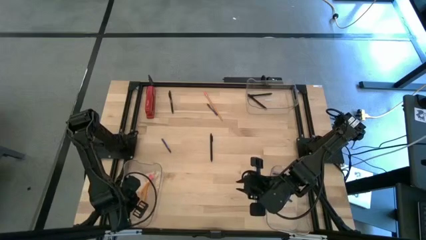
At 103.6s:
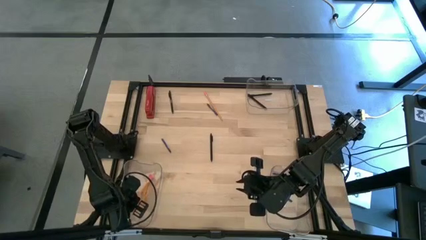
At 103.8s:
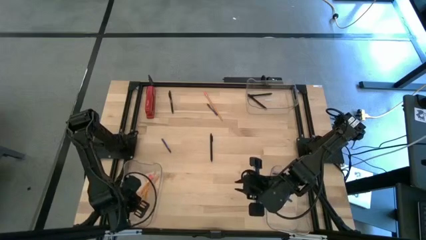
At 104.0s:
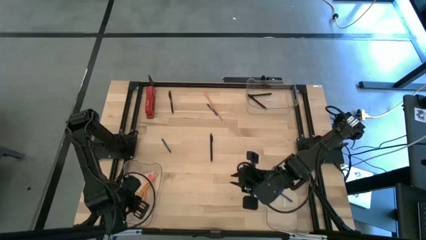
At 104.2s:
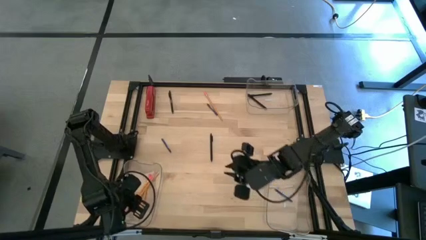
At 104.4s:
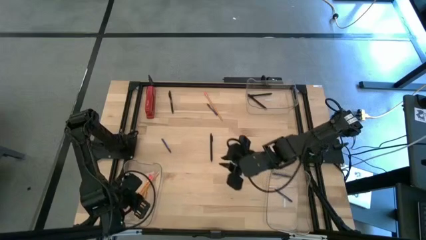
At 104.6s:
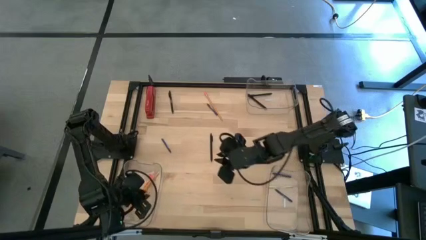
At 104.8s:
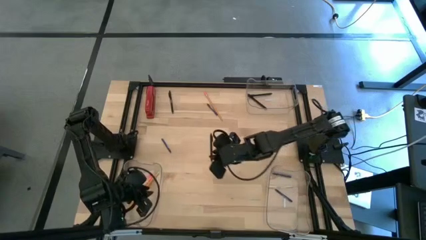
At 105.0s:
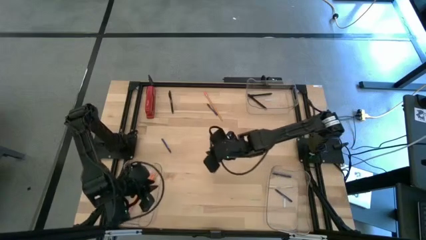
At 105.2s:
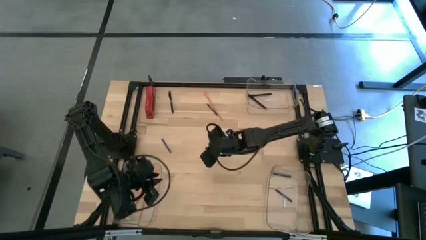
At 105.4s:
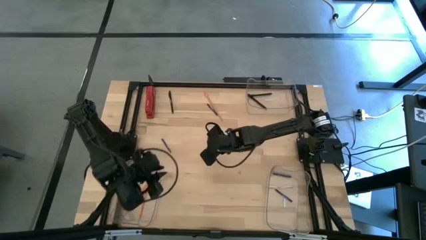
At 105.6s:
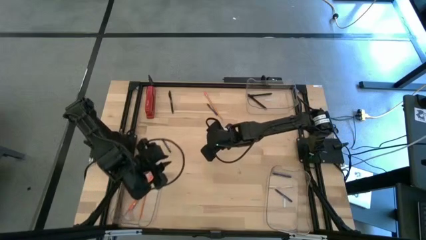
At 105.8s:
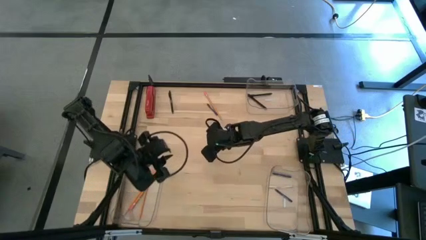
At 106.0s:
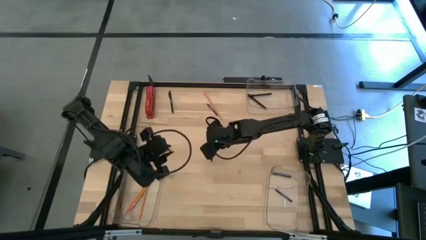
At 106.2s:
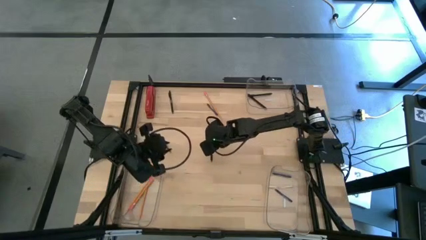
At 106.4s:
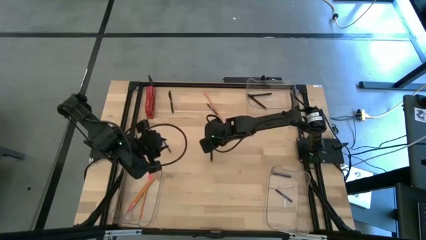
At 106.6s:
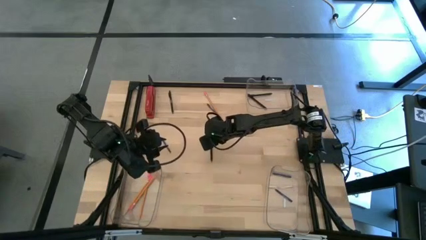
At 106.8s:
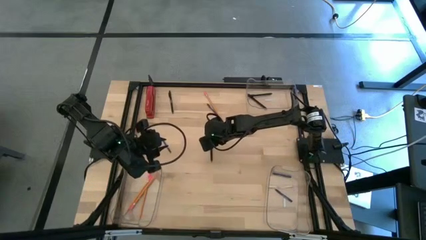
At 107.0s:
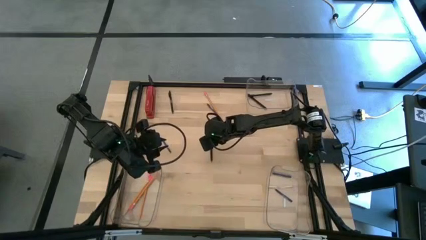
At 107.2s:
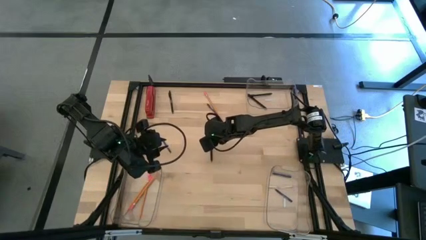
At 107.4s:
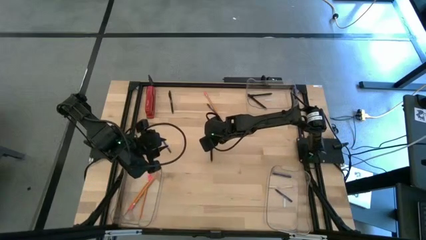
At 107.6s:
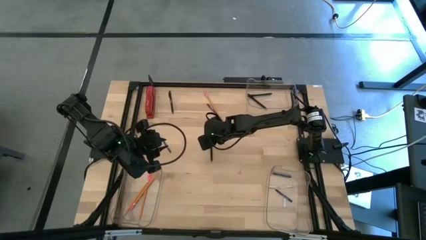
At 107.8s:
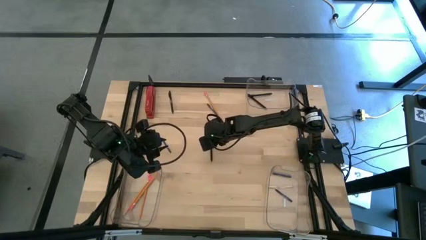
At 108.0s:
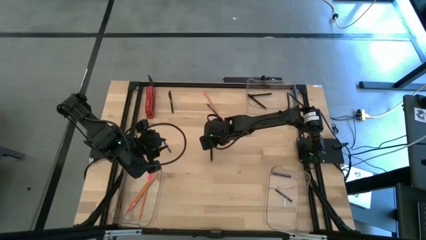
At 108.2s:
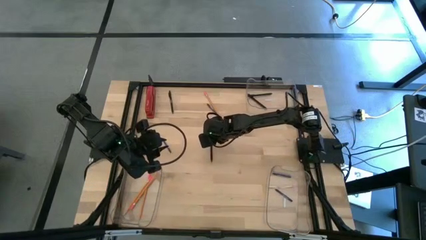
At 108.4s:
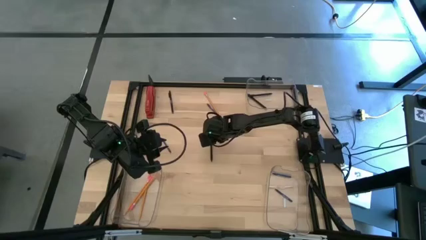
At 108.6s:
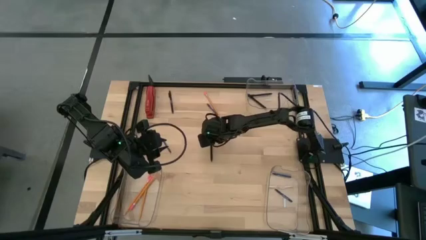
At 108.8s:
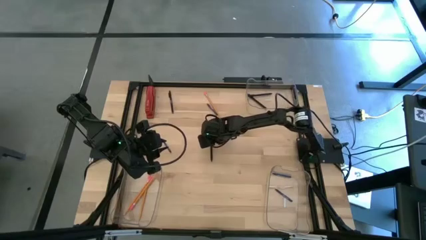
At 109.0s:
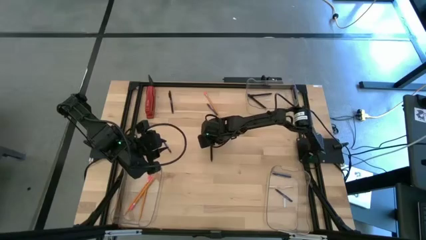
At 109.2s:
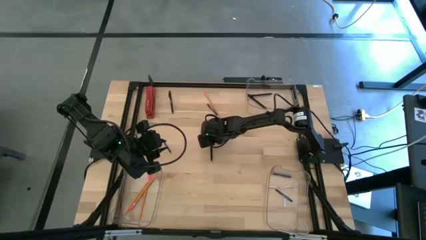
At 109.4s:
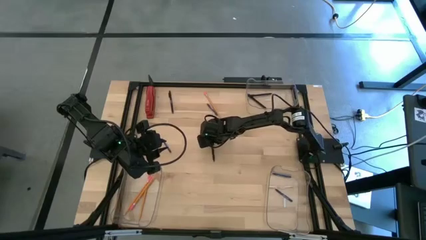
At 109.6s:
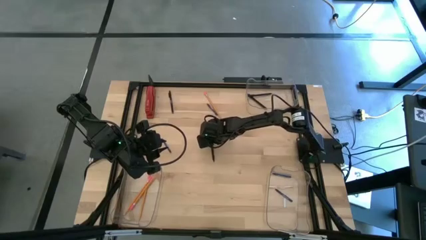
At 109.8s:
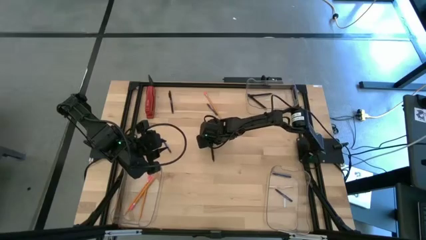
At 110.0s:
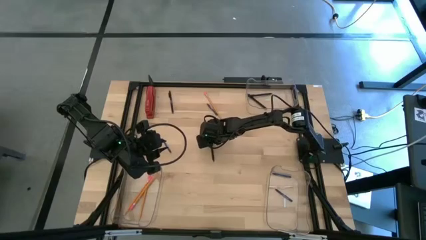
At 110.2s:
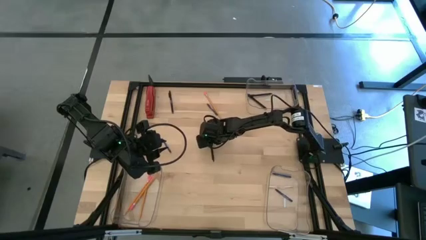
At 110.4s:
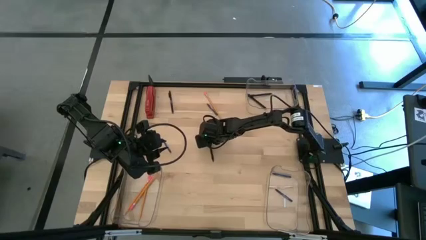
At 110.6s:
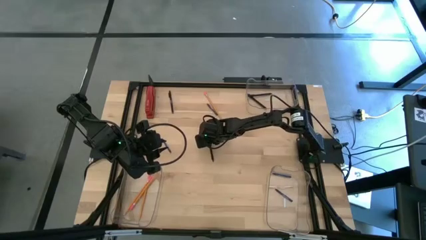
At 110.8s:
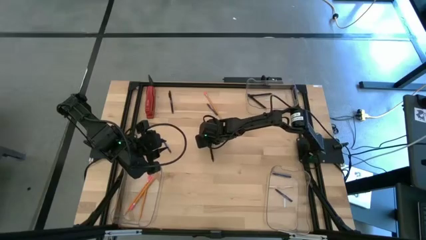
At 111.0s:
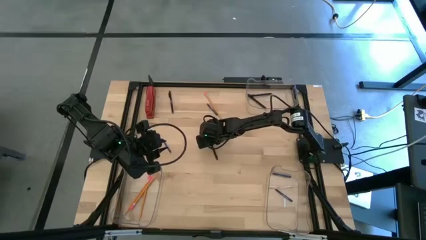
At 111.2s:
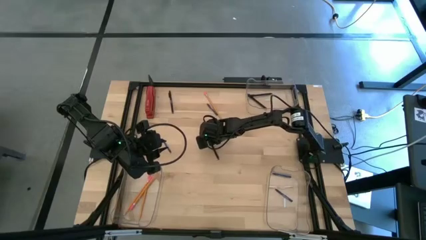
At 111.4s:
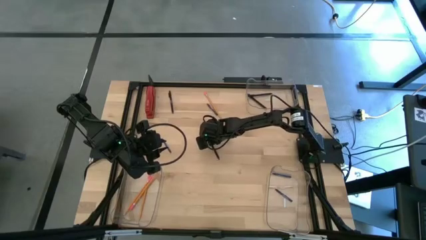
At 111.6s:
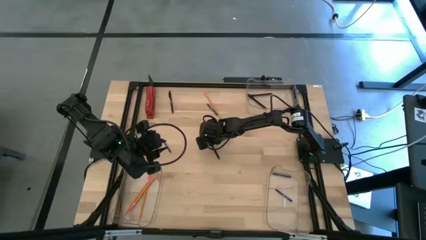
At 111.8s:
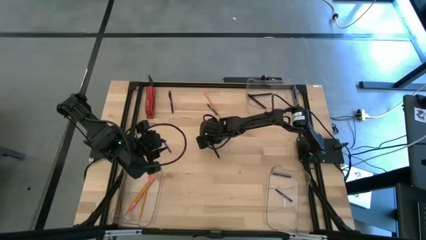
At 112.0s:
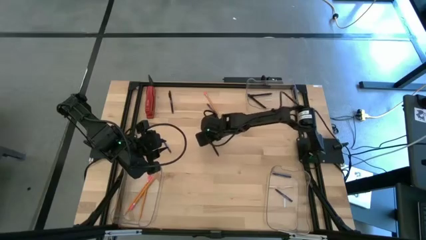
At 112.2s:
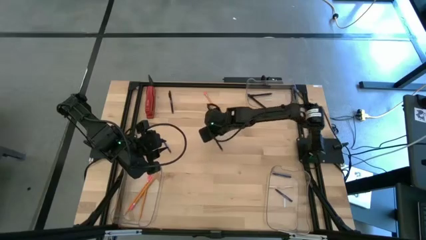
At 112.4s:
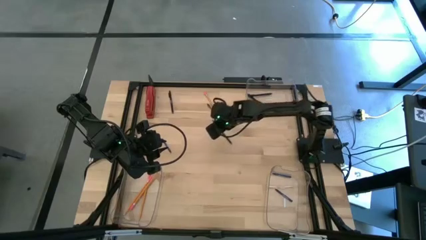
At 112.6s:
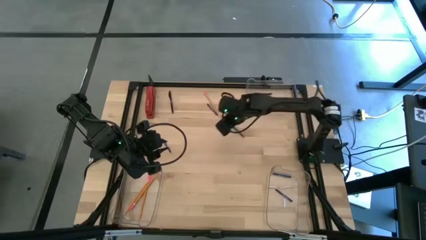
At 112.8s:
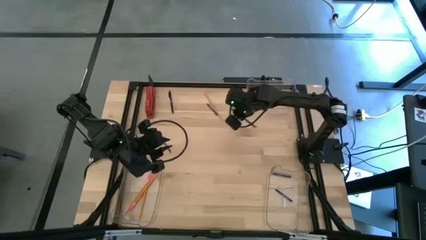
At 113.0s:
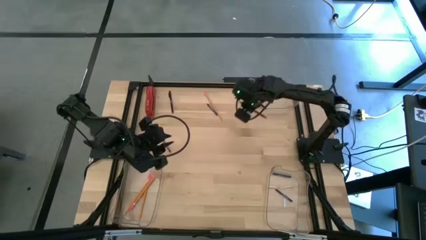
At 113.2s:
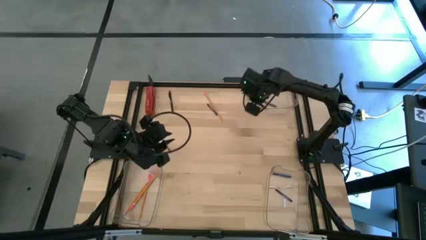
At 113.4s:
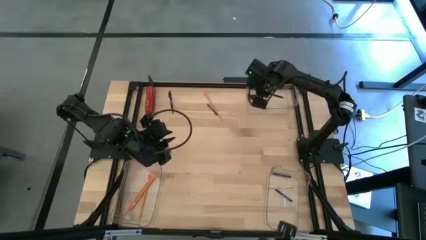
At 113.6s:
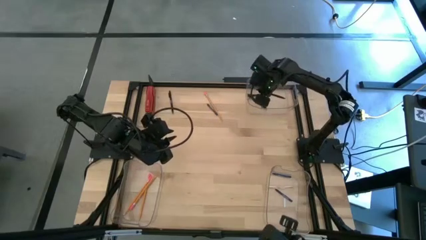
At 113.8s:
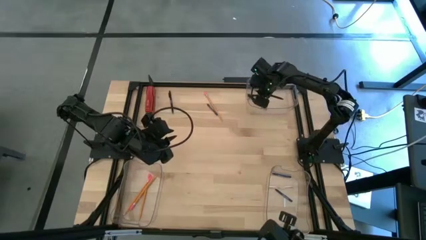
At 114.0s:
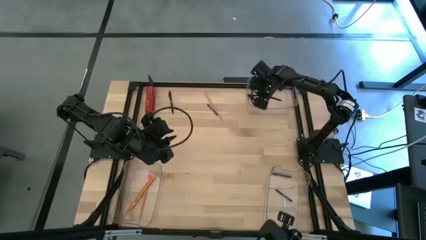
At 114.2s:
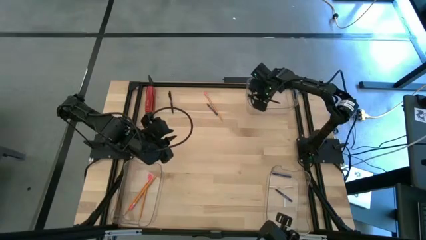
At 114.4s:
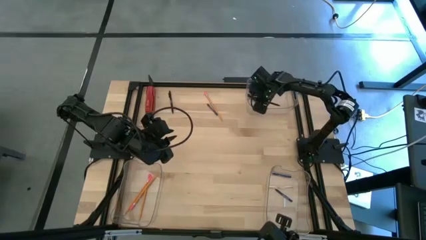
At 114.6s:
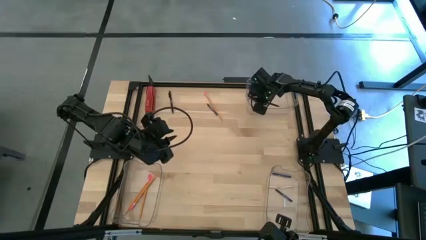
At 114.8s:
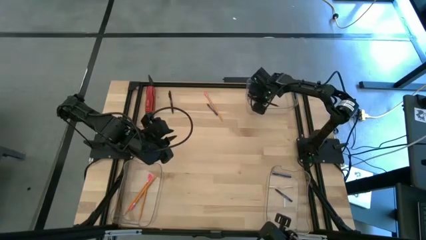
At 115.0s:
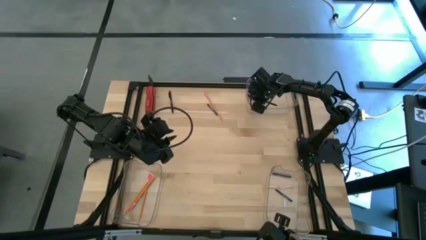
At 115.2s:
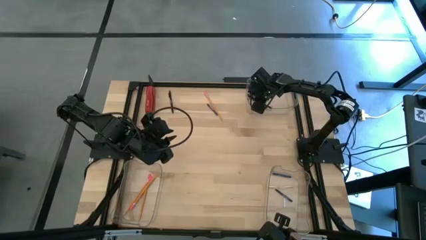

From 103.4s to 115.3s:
Task: Sort crayons/erasers/pens/pencils in bins
Put the black pen into the top transparent bin
